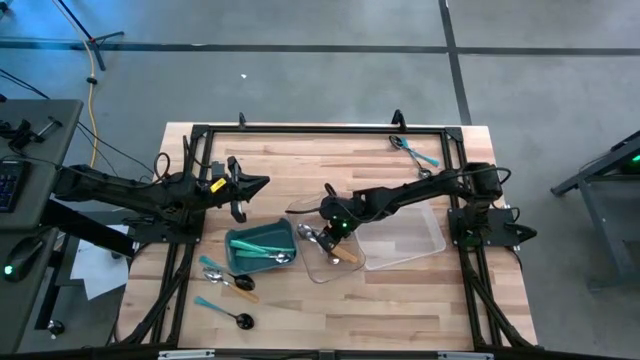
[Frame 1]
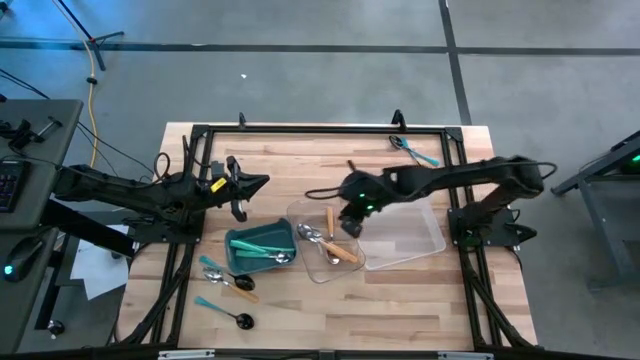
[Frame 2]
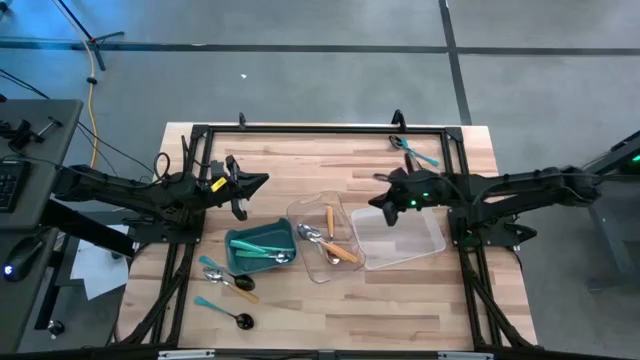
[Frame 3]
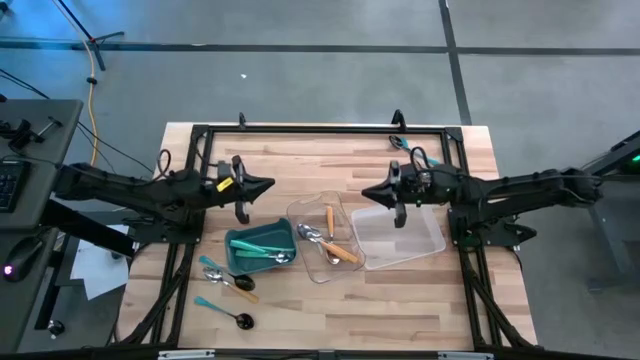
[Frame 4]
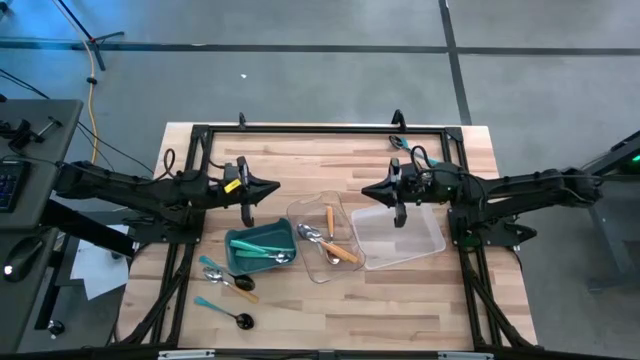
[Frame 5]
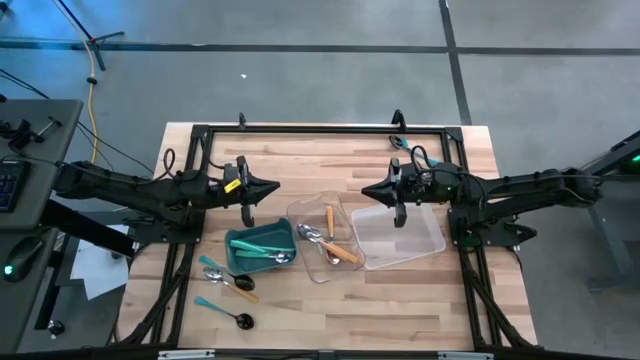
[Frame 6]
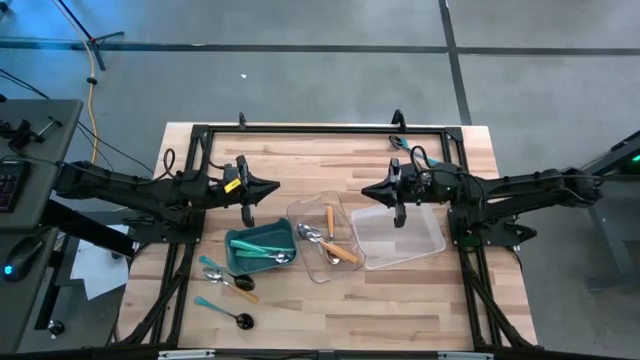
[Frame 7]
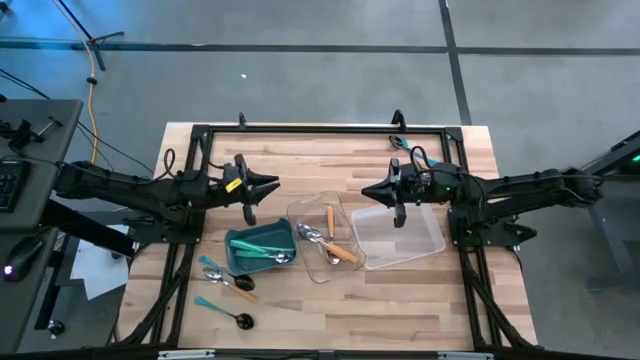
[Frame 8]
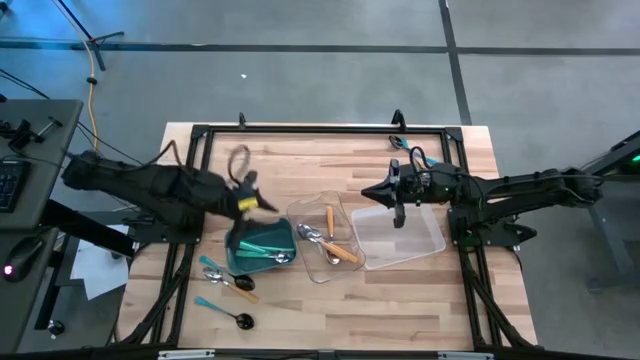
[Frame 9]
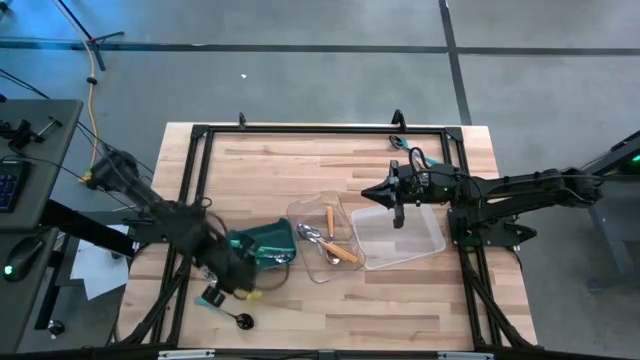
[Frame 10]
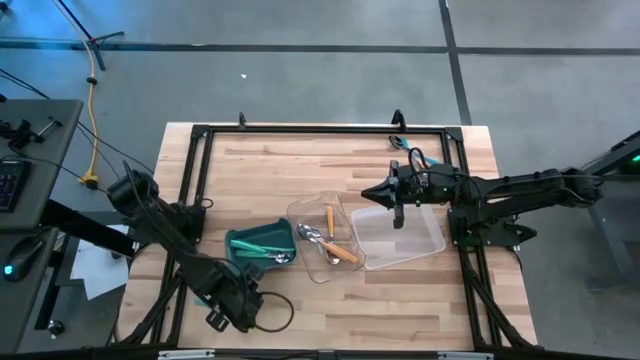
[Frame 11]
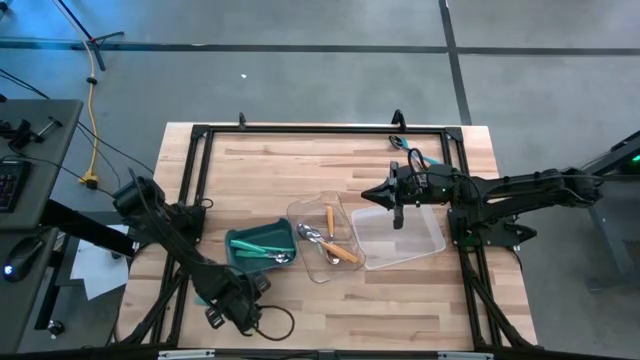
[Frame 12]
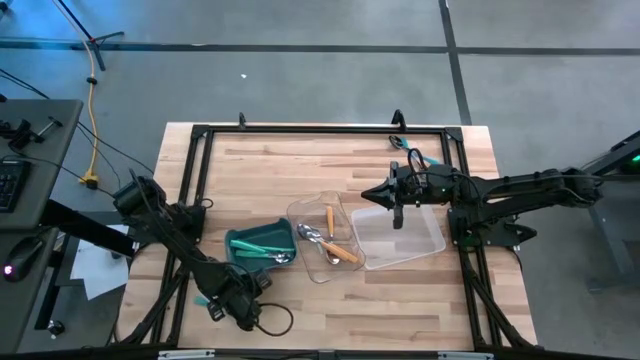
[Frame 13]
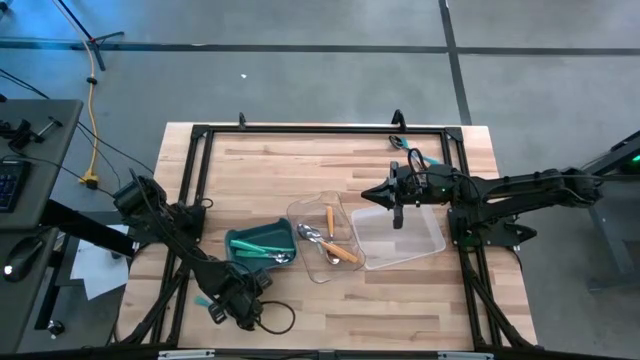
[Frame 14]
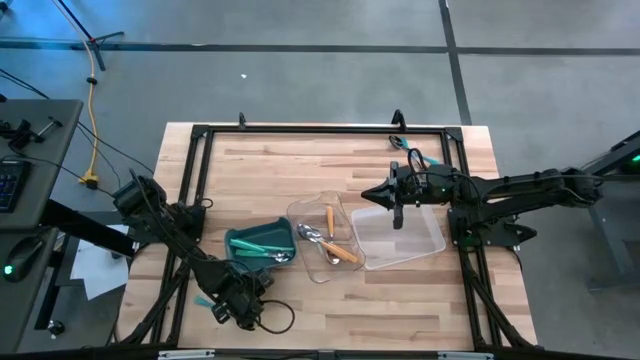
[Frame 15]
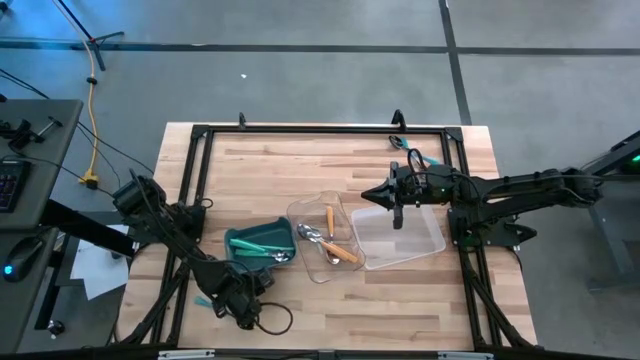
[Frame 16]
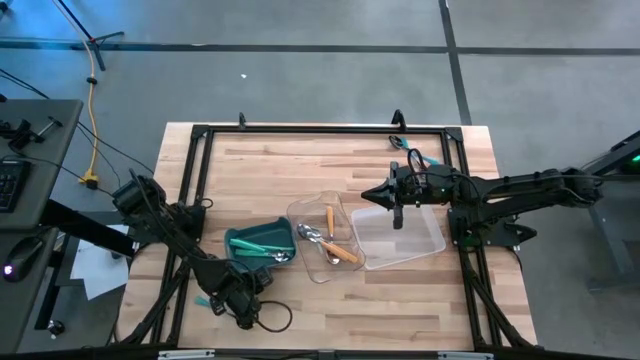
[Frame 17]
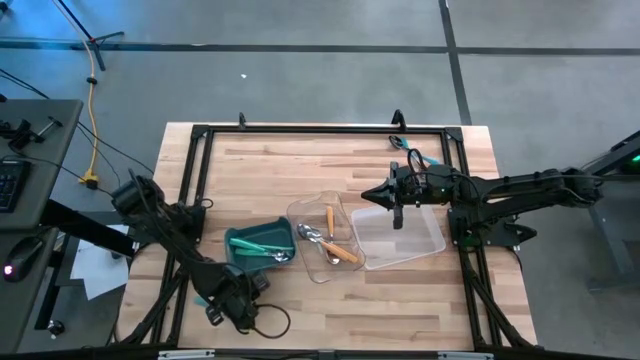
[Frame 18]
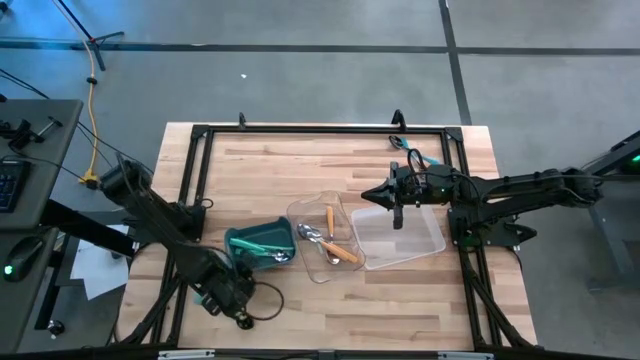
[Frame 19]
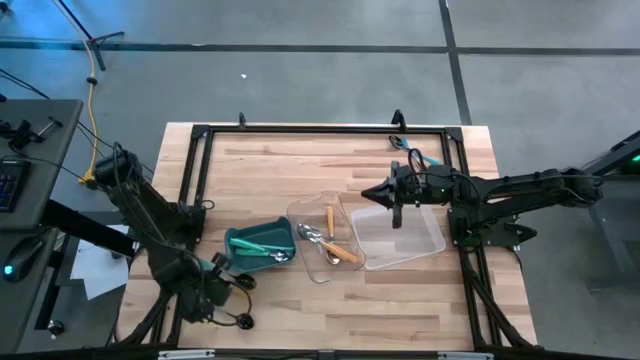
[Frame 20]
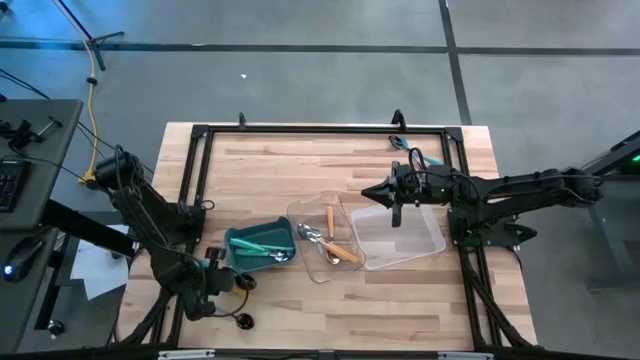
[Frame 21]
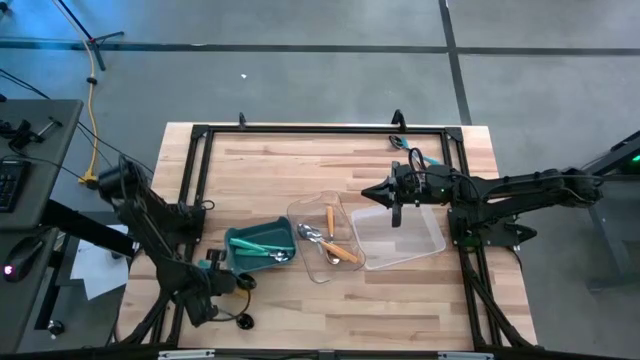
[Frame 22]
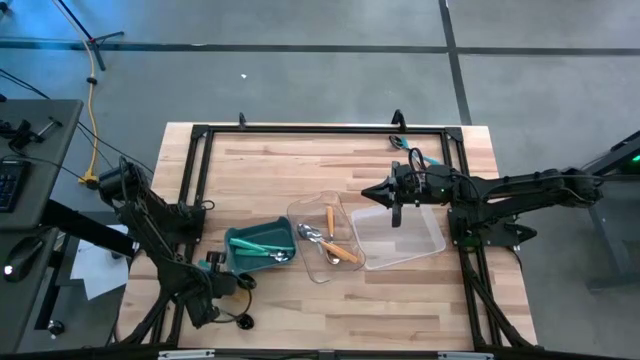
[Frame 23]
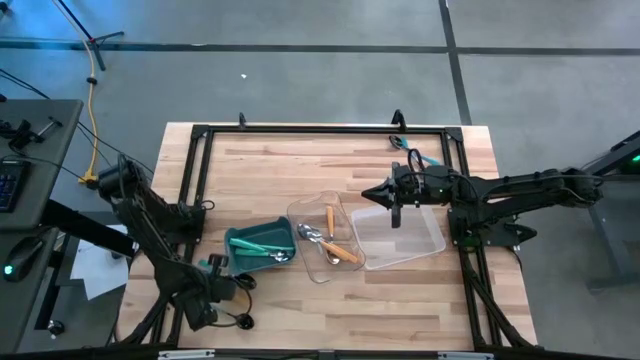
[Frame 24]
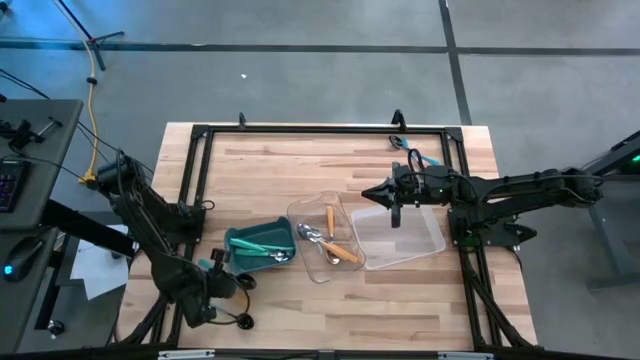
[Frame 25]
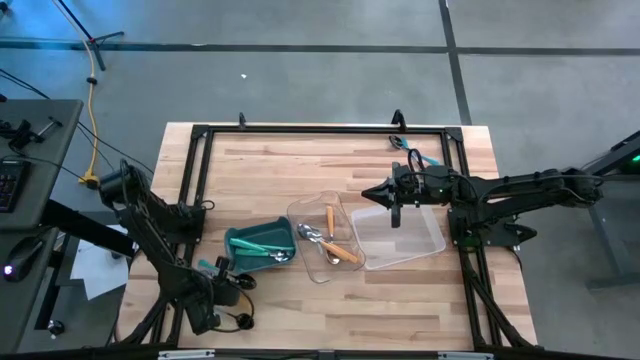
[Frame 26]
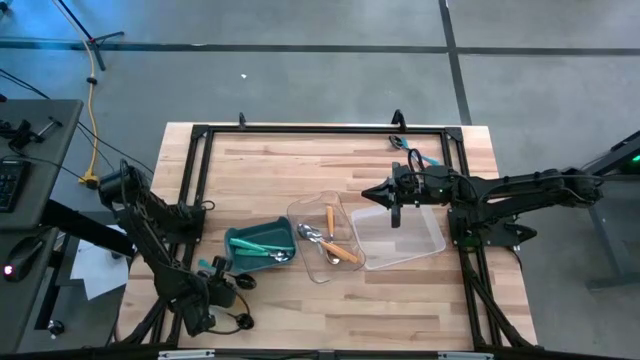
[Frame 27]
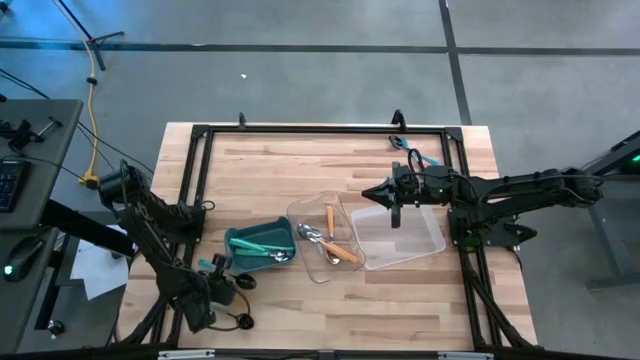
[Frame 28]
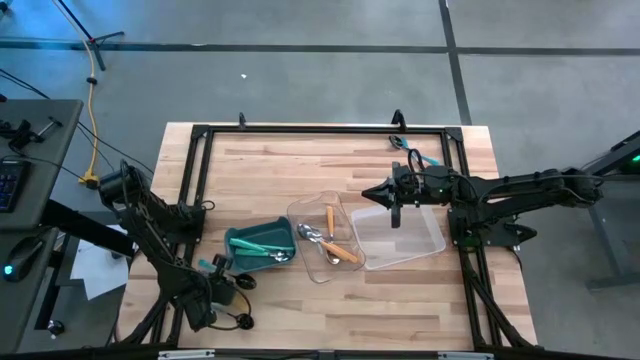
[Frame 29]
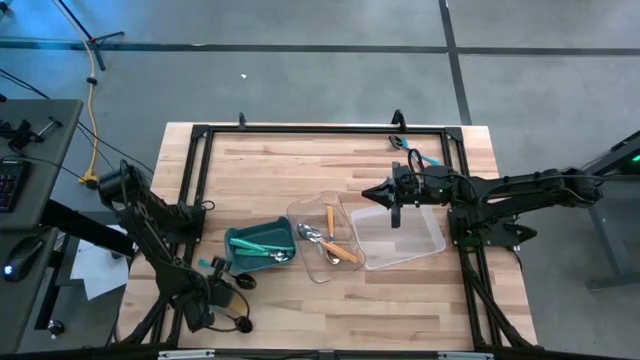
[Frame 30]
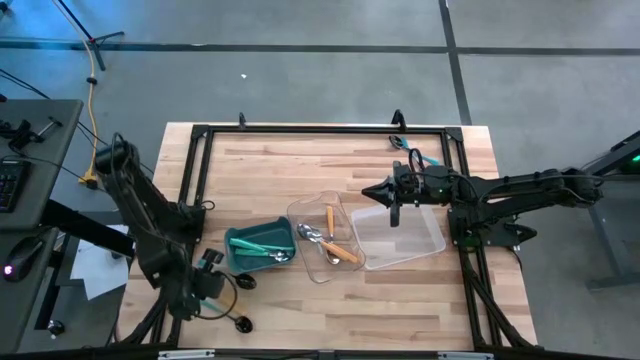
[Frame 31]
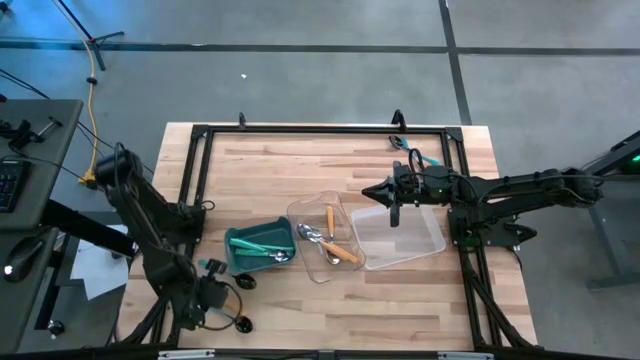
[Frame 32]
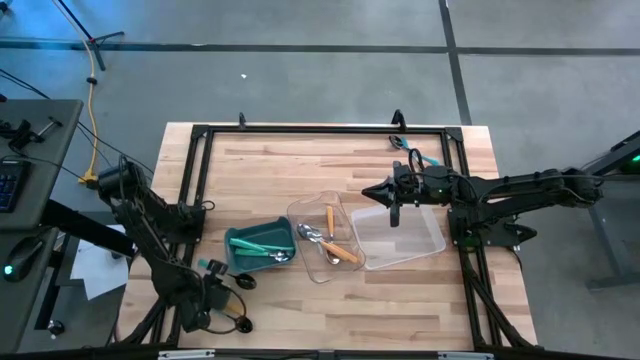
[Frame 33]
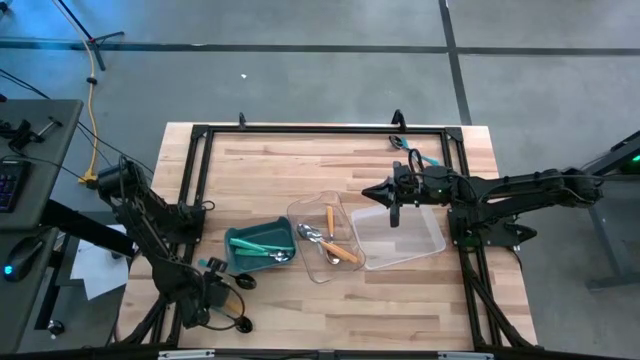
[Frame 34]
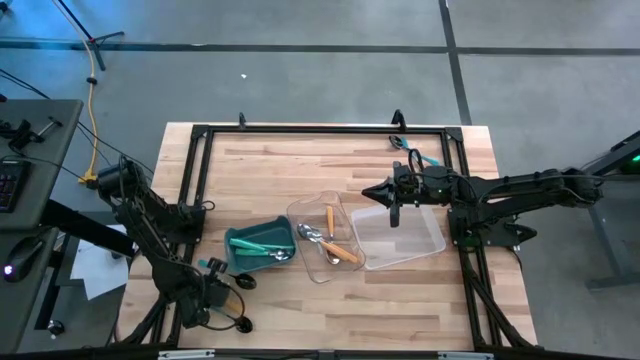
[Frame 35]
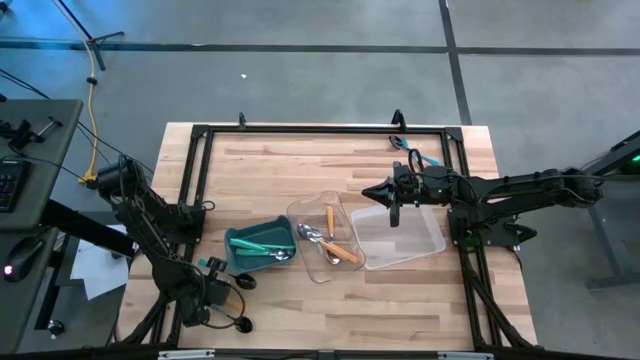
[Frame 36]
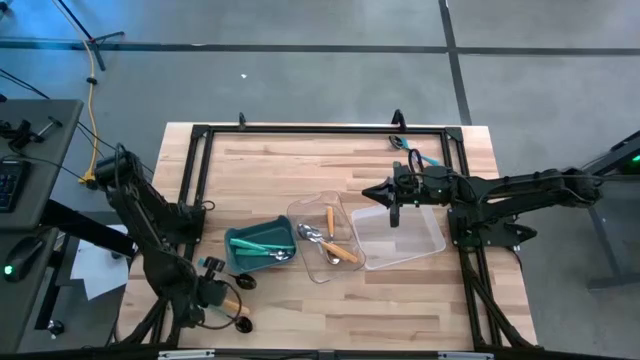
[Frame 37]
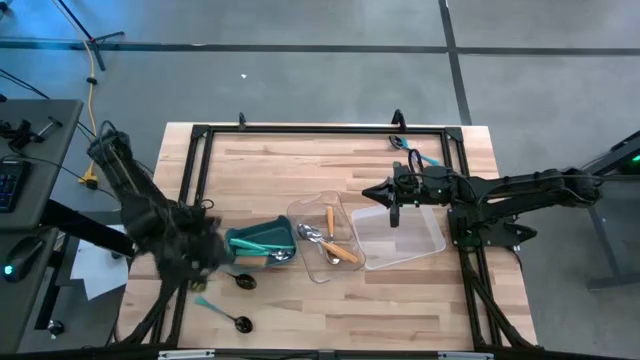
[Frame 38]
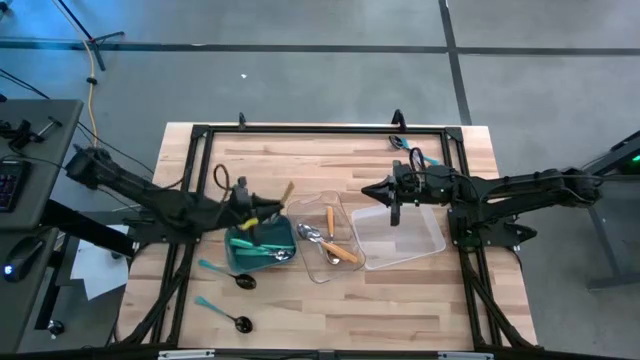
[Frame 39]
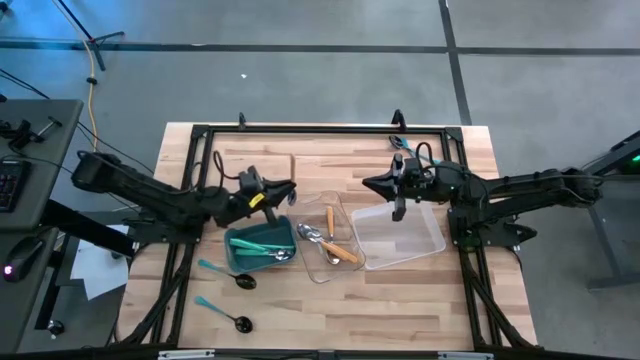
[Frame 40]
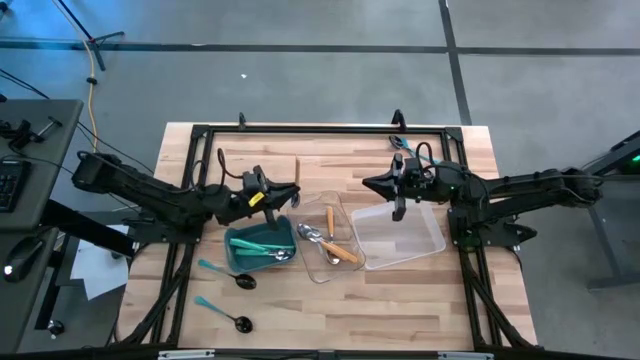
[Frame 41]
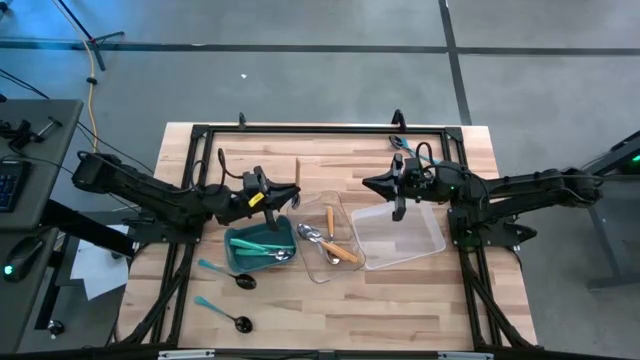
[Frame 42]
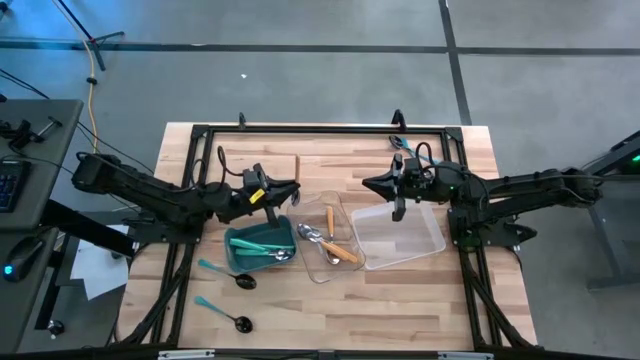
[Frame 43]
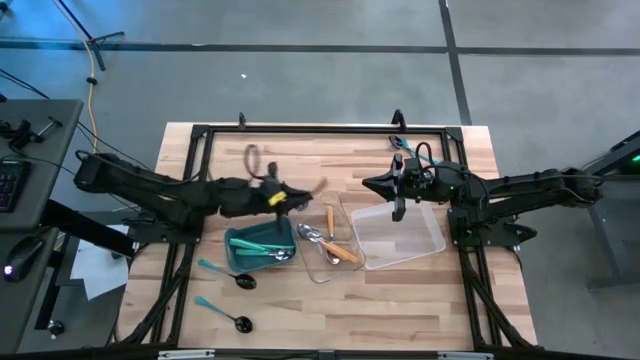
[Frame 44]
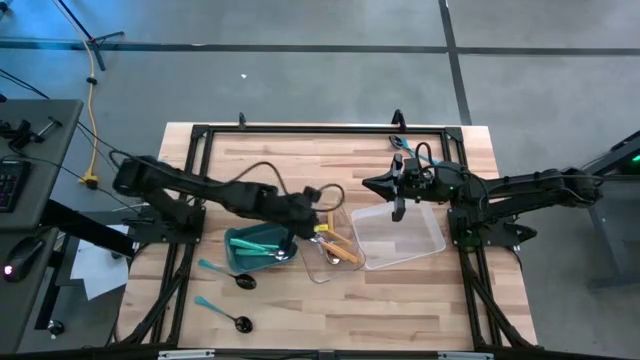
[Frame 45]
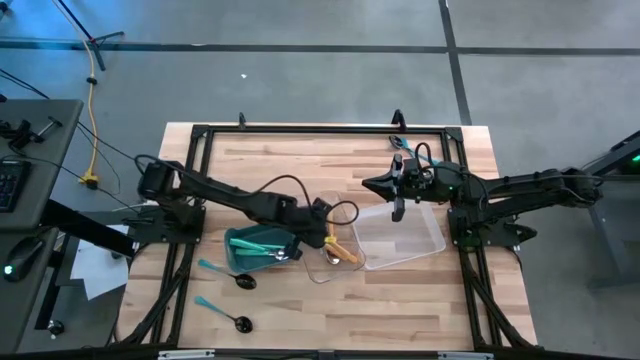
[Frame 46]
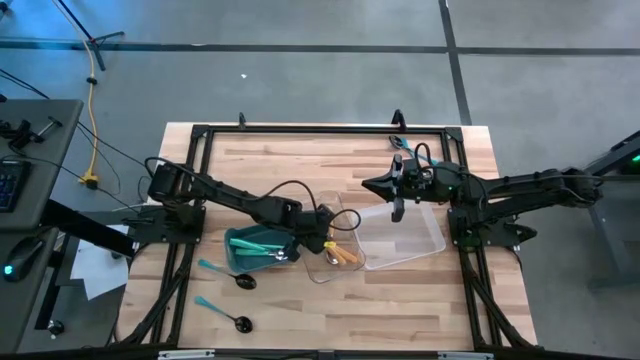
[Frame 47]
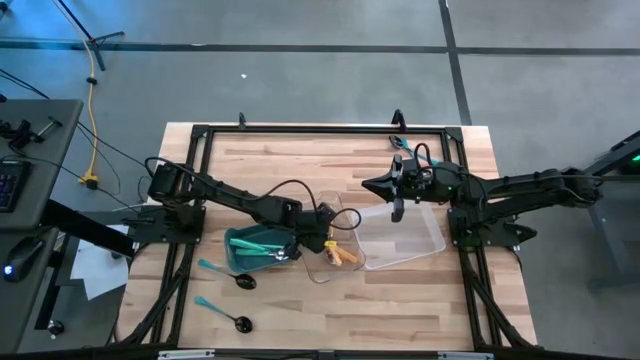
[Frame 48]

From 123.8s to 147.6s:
Task: Sort silverware by color (type)
Put the orange spoon into the transparent bin
